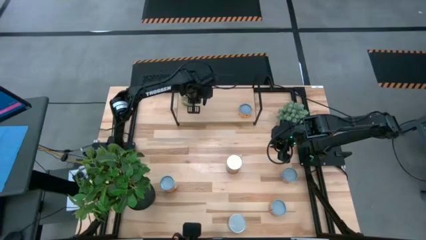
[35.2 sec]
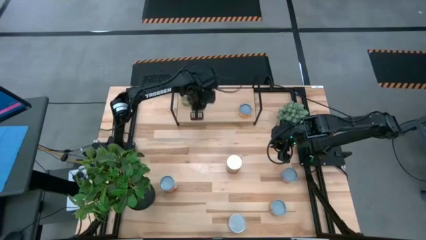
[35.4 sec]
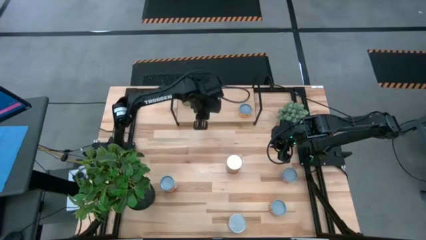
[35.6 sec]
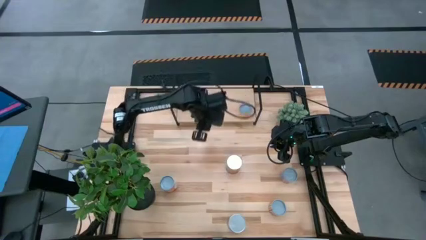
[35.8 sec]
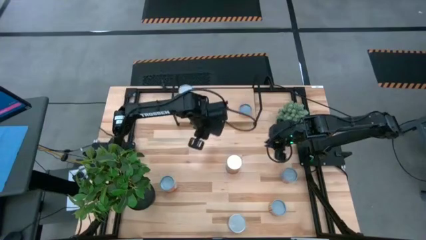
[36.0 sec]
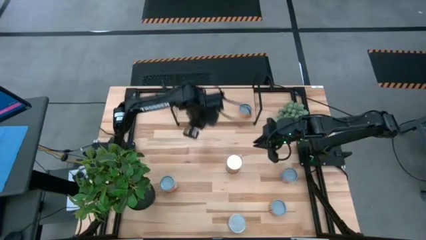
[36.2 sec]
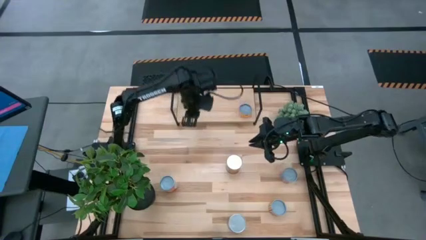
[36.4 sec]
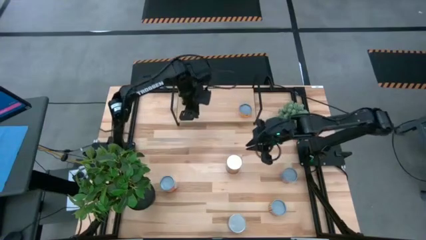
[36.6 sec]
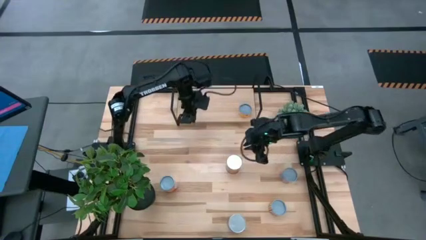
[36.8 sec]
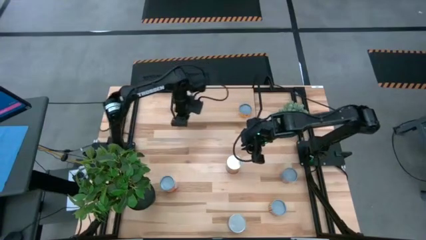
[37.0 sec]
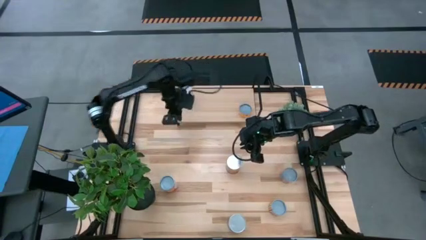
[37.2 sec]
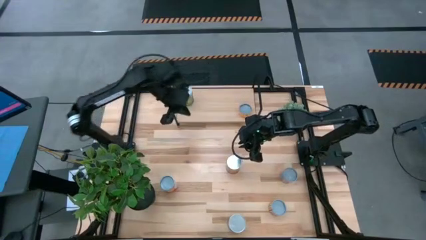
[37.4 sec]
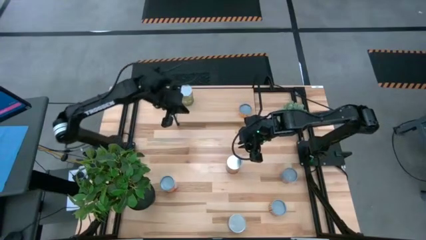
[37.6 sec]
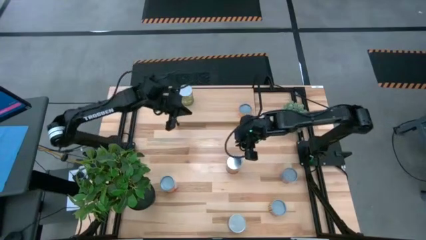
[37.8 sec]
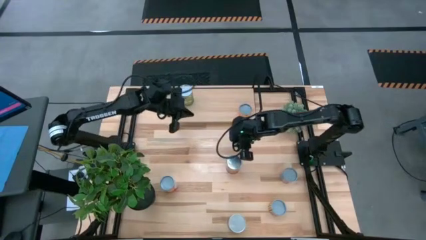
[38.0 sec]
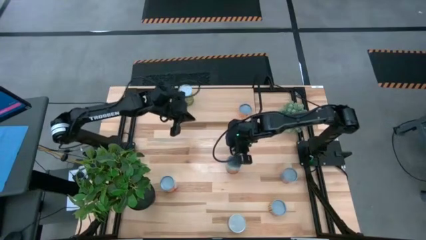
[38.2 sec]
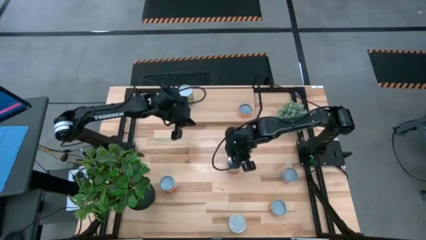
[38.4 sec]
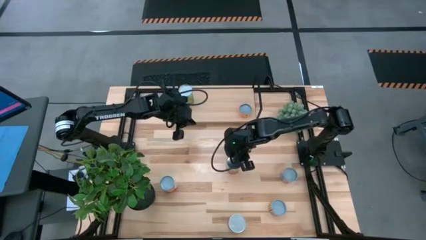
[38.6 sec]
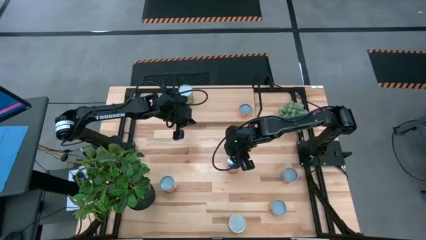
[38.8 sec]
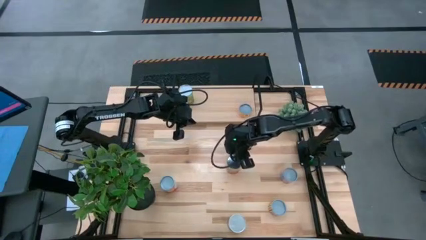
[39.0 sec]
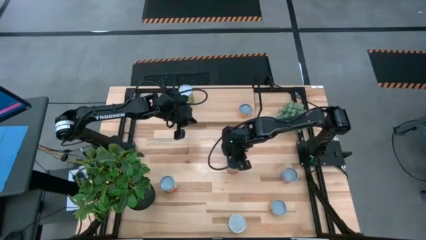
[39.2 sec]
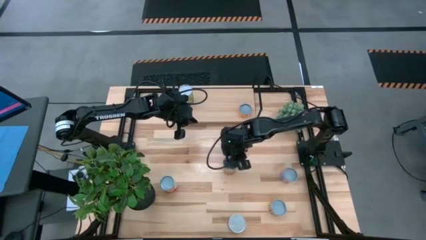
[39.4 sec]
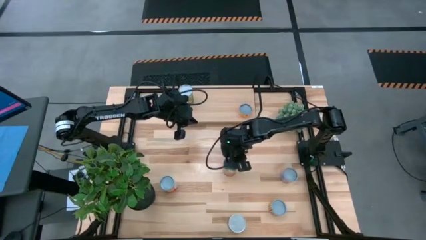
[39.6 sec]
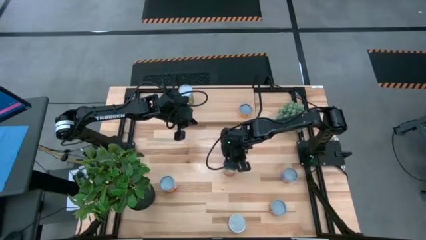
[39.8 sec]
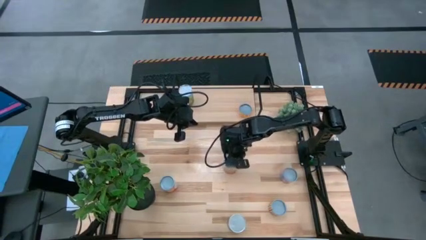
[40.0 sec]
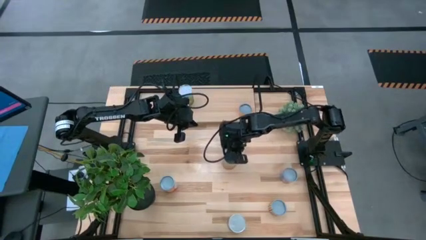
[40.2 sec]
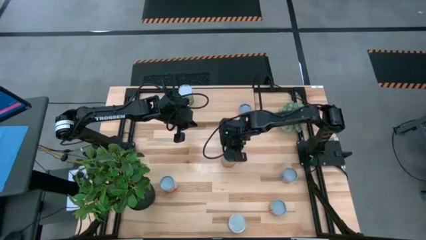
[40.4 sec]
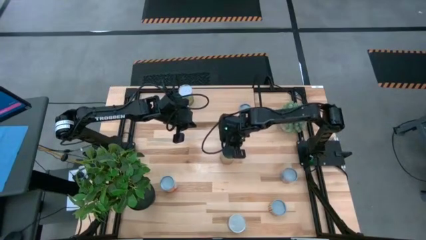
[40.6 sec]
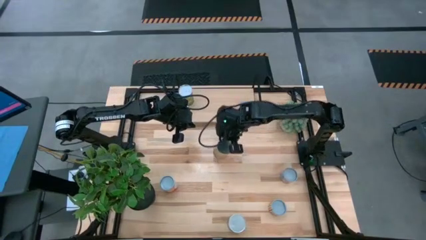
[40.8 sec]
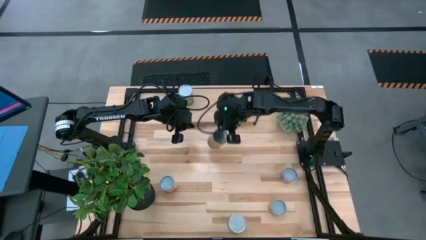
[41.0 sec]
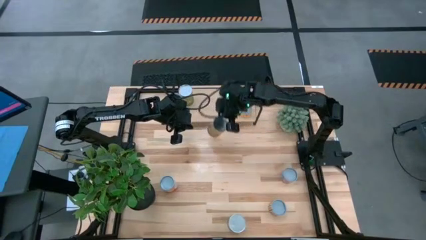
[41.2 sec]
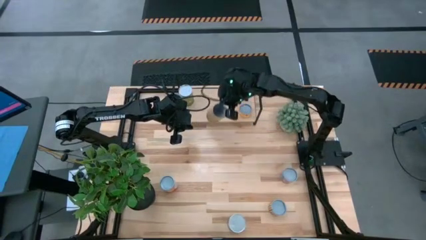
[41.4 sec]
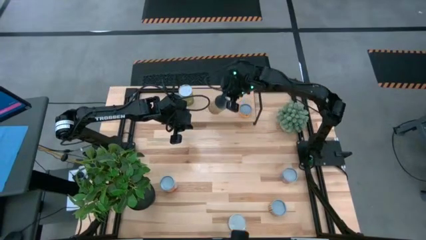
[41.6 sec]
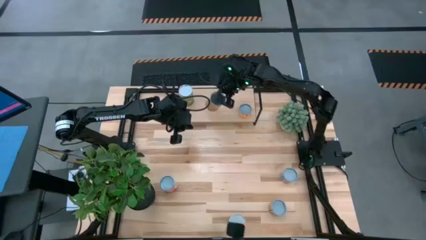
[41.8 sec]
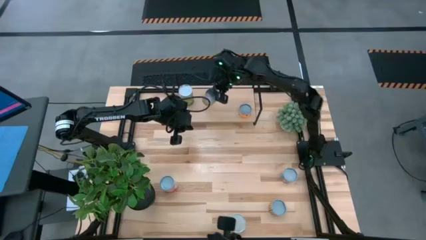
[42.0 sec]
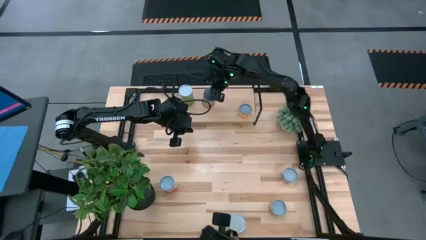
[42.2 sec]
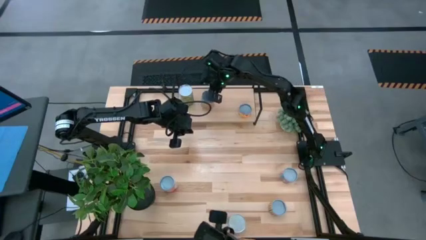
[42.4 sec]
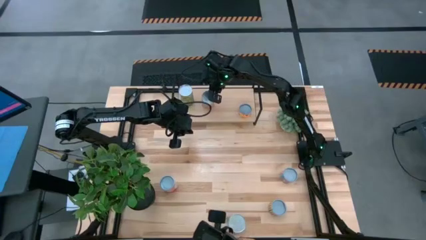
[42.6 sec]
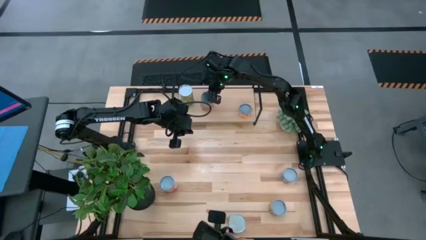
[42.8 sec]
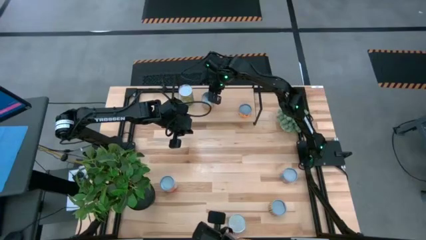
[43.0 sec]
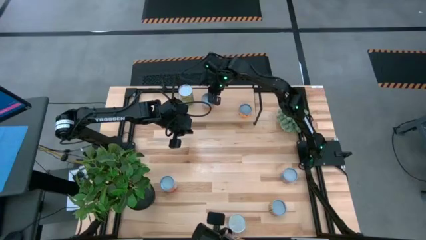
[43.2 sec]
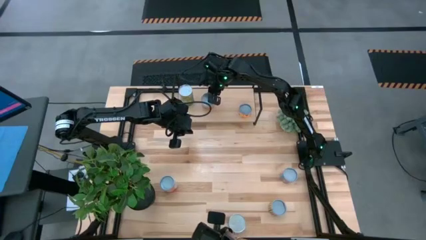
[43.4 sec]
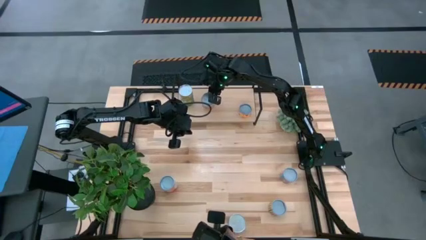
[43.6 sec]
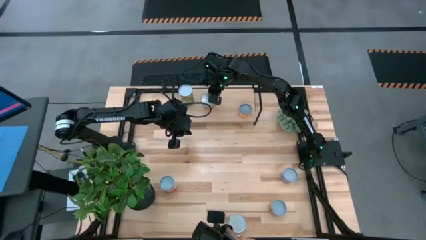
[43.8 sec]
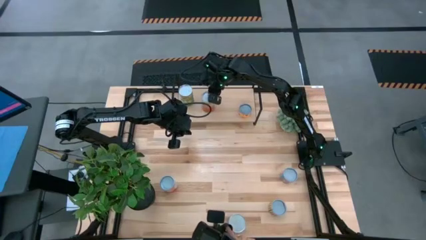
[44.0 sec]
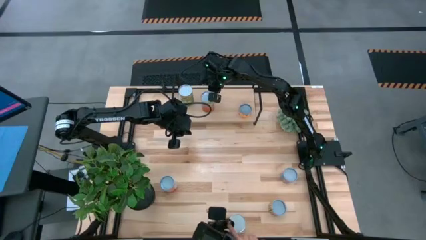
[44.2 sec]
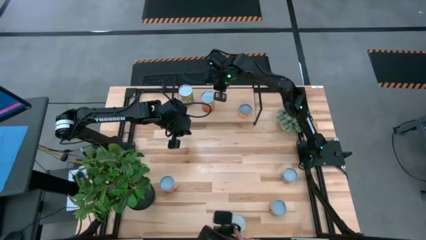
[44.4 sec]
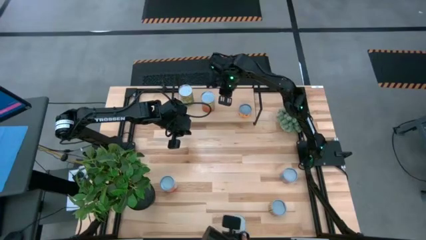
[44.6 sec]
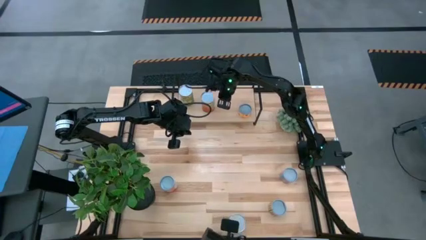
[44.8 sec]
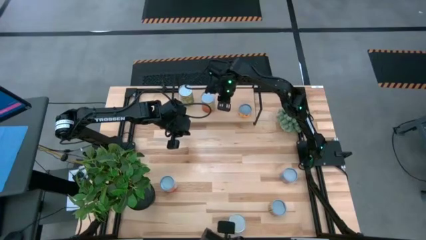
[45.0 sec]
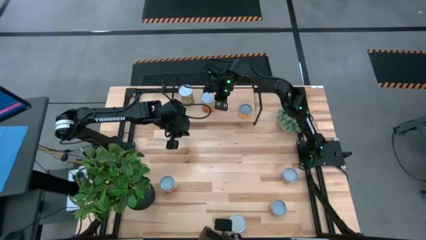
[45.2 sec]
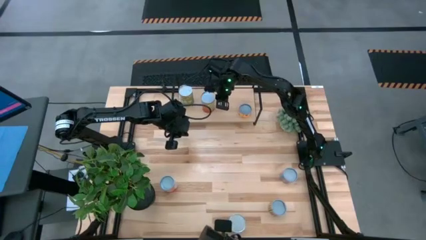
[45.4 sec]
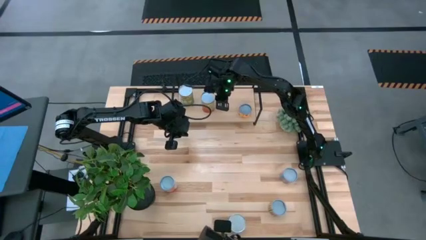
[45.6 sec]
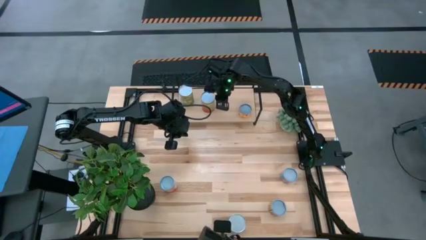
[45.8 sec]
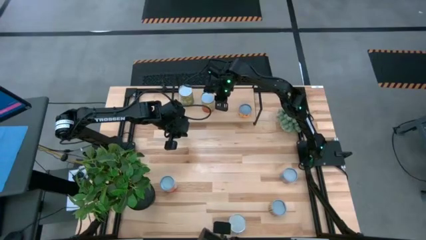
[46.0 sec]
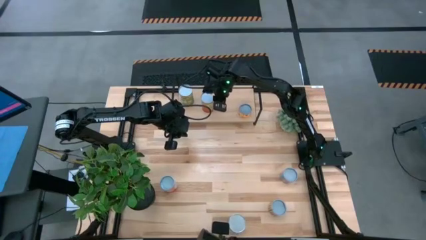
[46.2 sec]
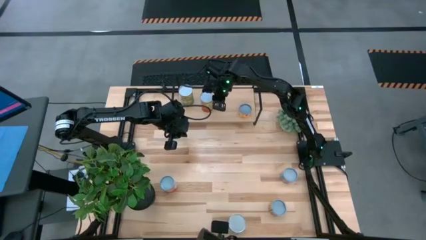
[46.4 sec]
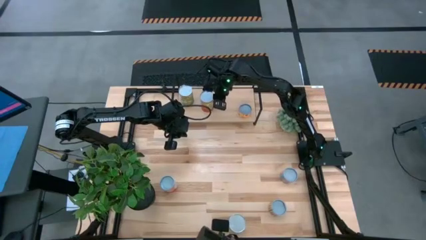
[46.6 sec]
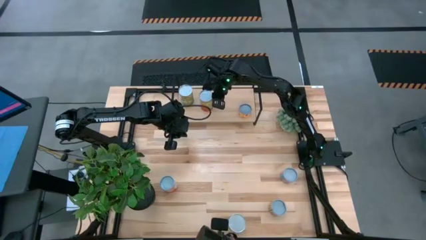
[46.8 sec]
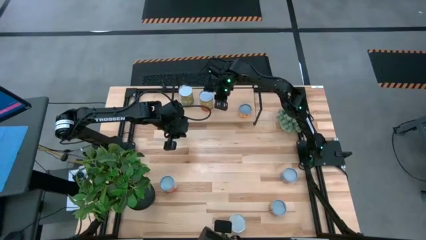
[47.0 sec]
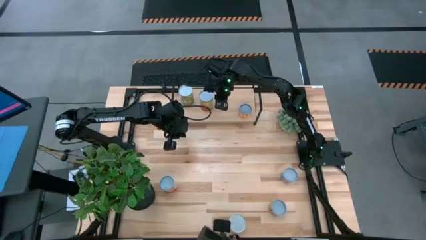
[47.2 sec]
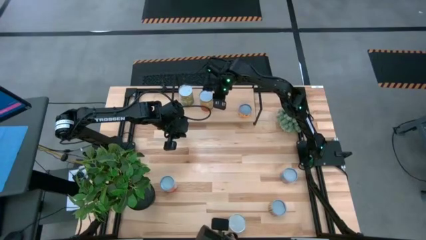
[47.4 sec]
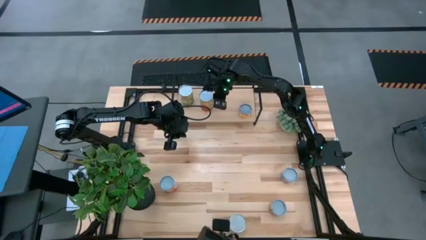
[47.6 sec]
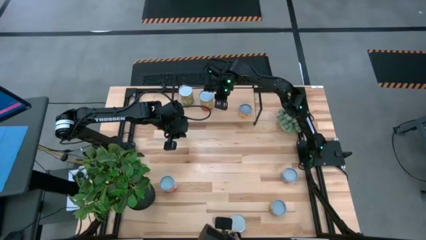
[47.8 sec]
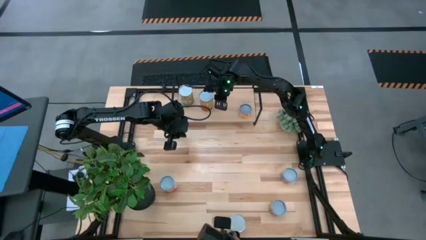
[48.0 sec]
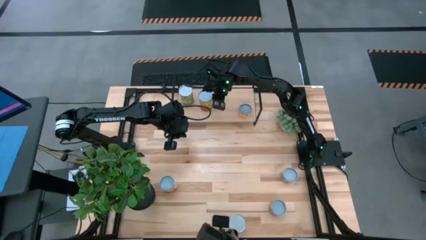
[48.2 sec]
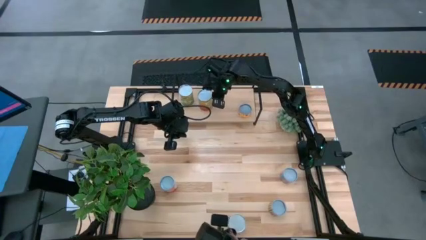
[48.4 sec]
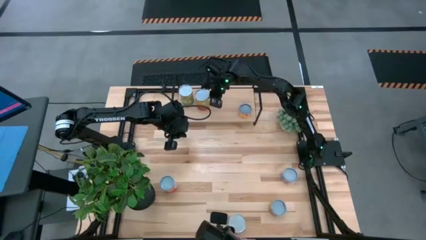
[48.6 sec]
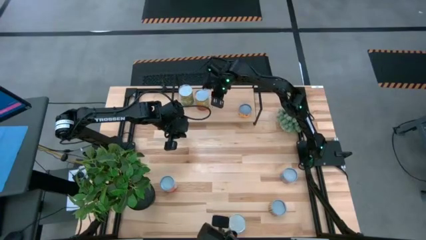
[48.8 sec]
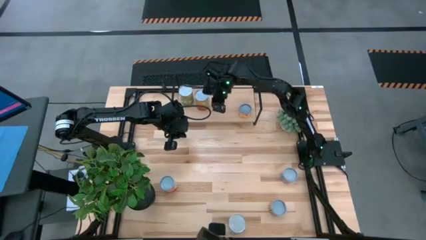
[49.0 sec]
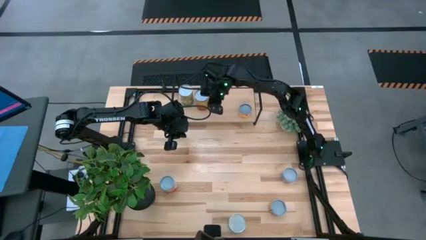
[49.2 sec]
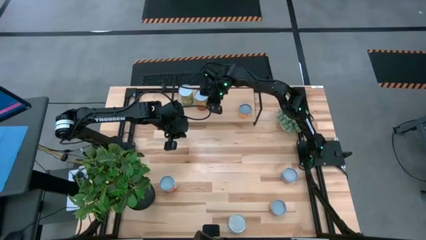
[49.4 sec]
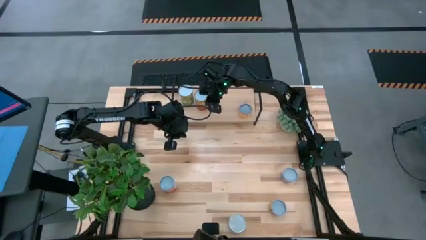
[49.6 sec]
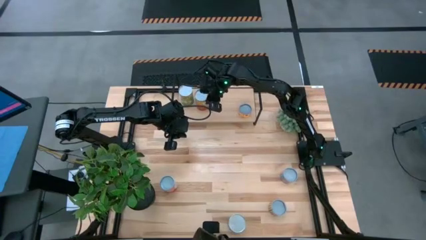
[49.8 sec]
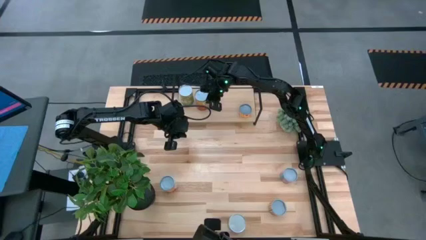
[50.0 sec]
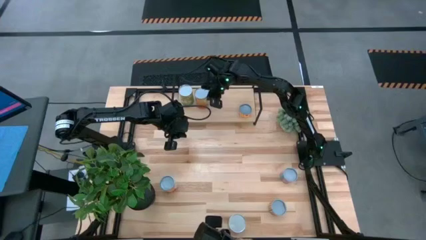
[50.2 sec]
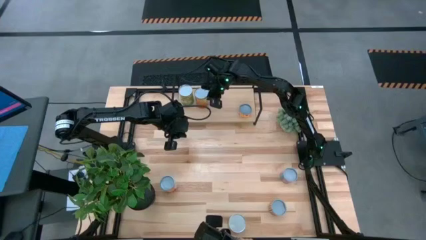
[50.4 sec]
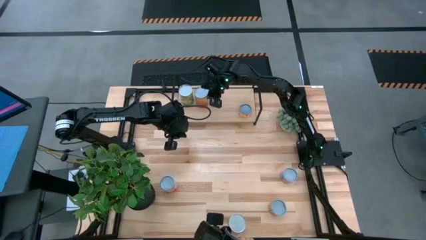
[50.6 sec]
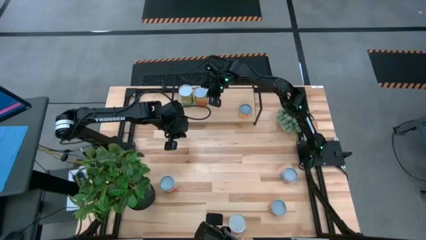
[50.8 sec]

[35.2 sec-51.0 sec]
Task: Pick and place cans onto a shelf
Put the canned green beans on the shelf
